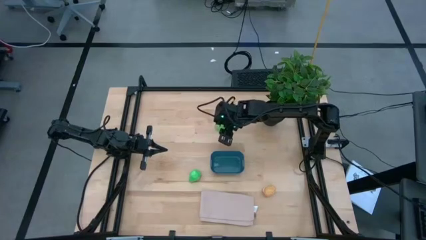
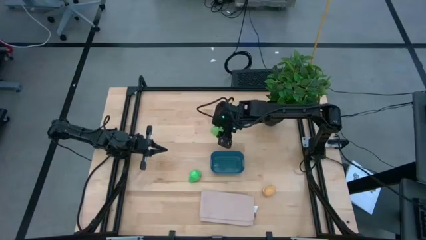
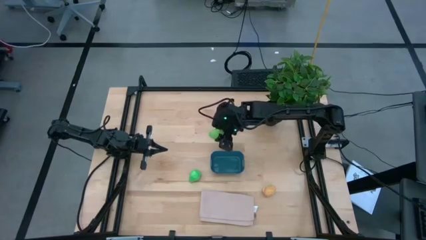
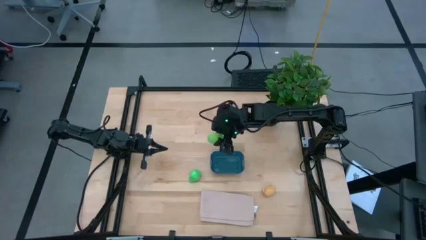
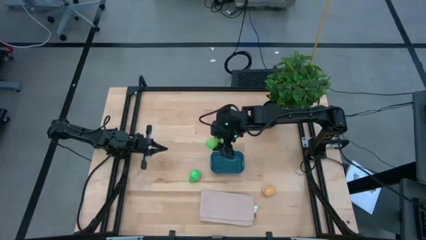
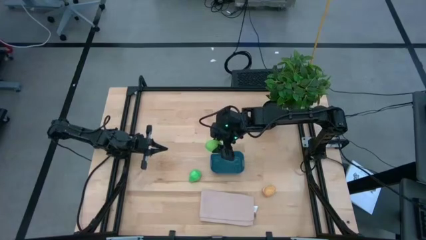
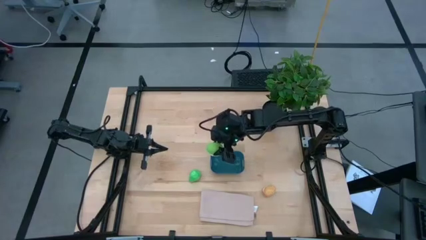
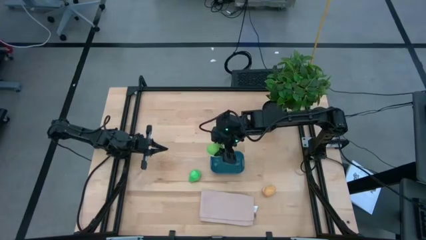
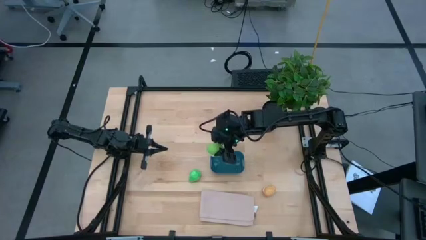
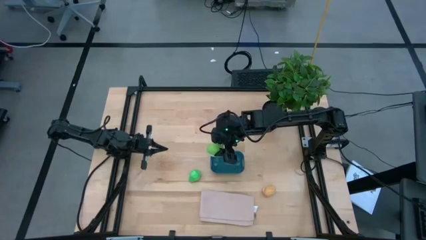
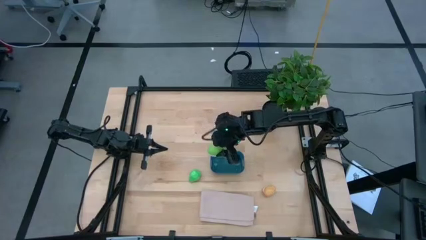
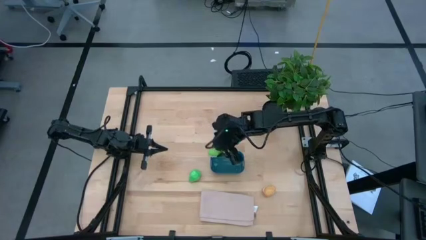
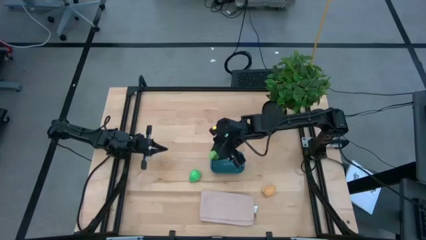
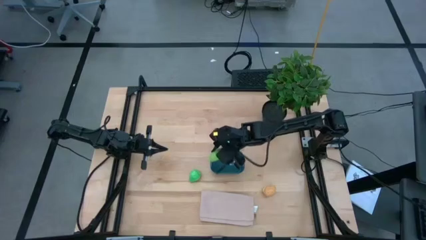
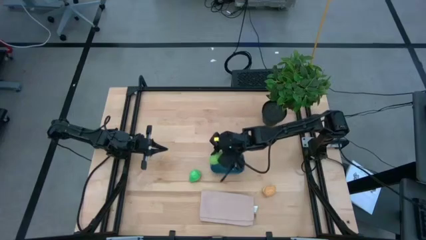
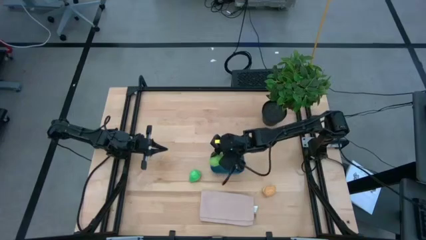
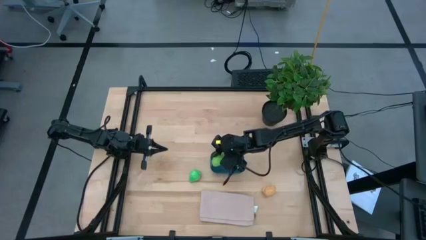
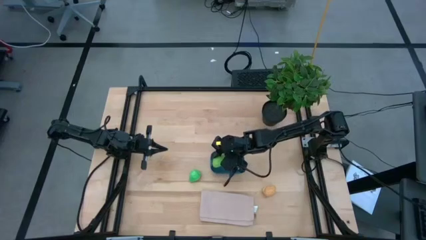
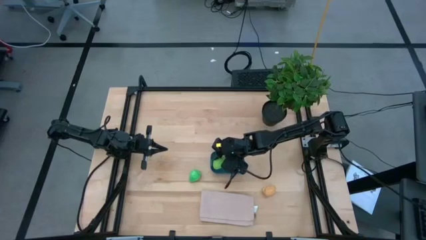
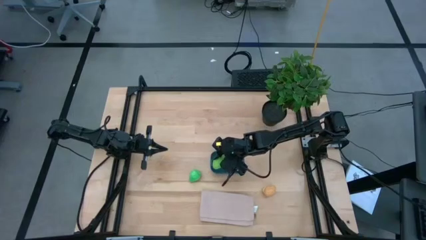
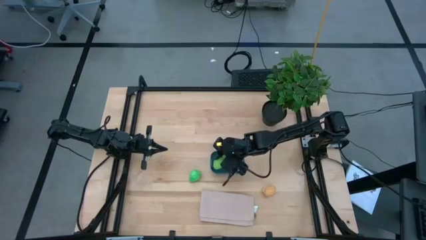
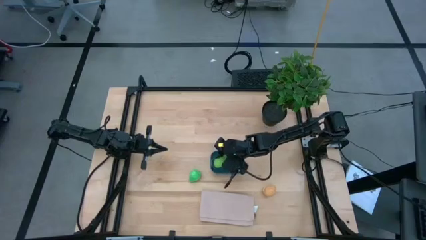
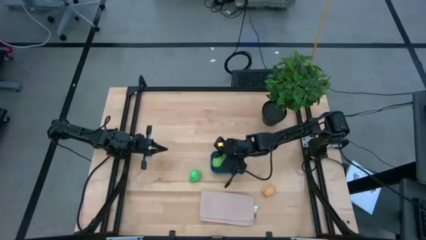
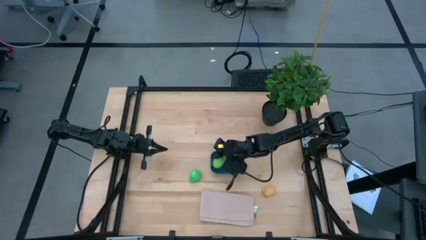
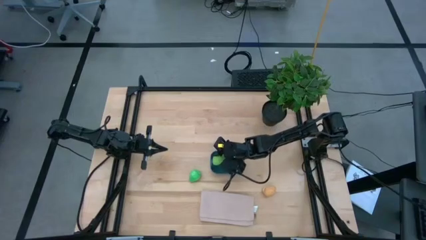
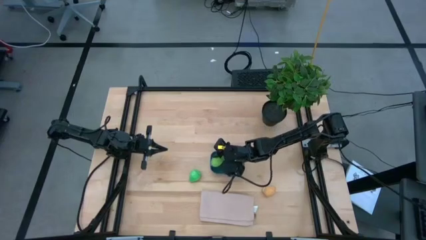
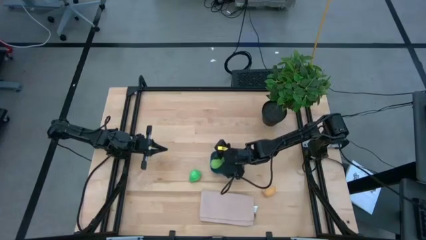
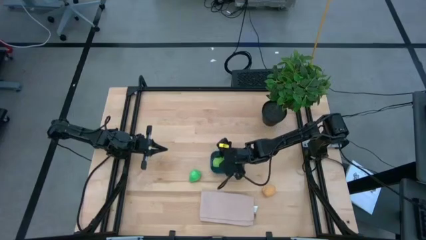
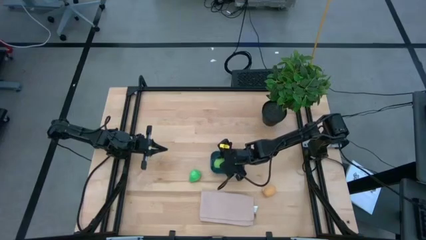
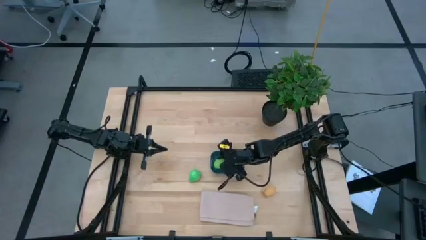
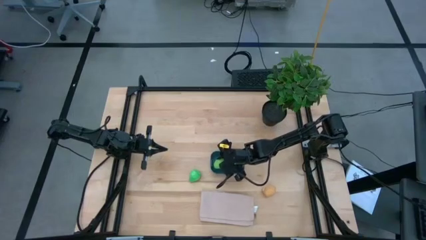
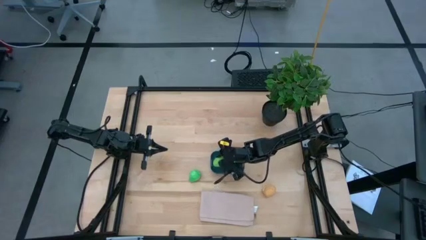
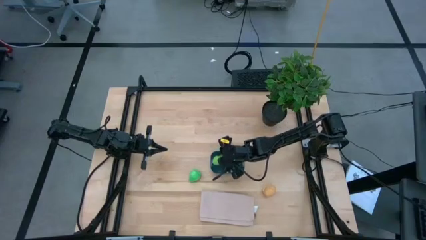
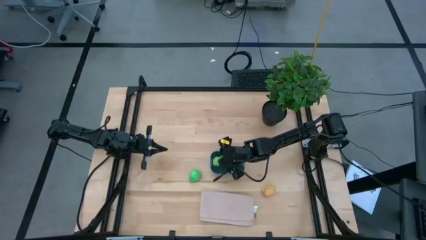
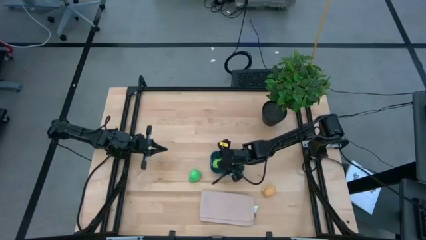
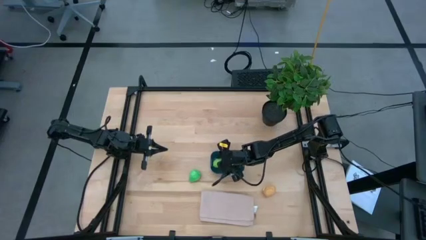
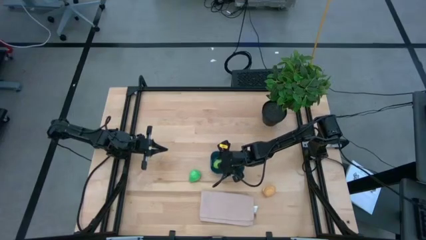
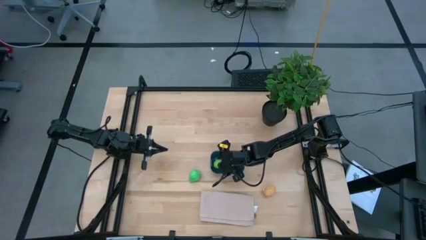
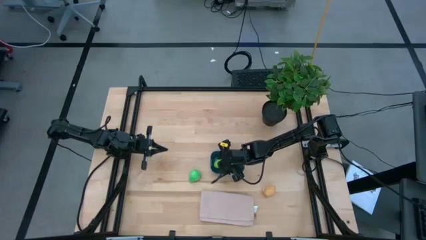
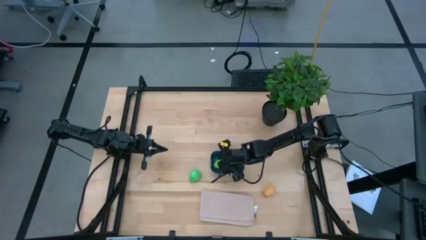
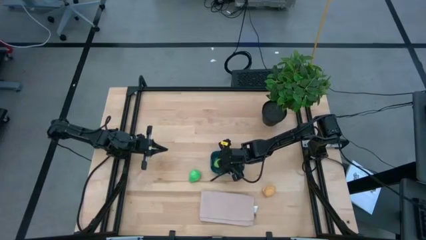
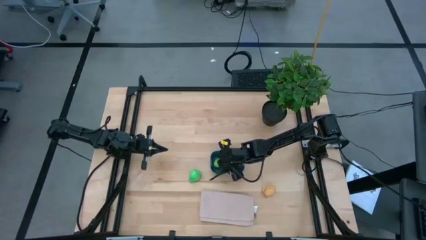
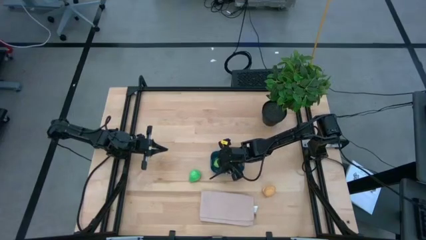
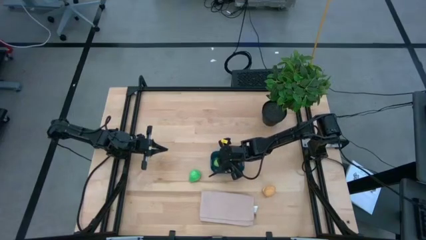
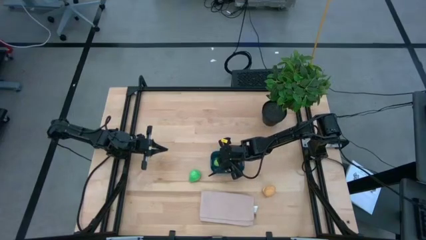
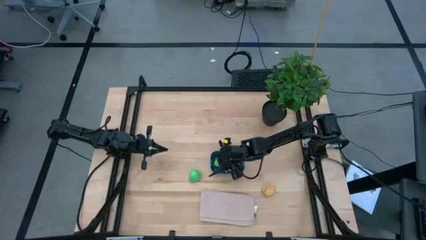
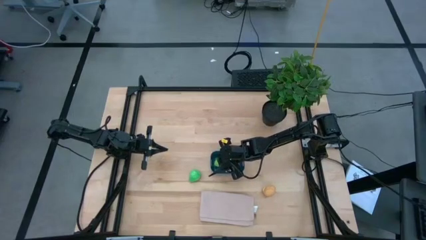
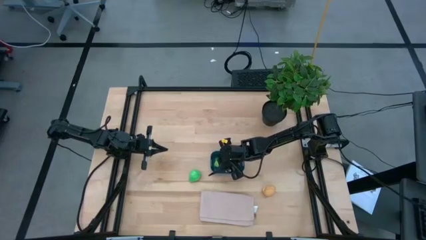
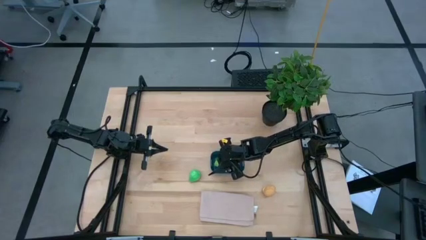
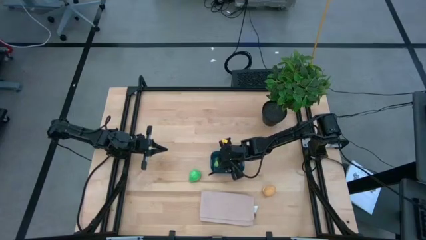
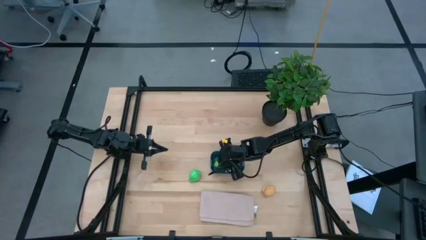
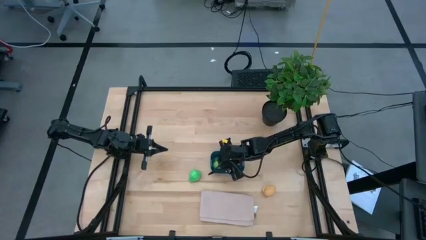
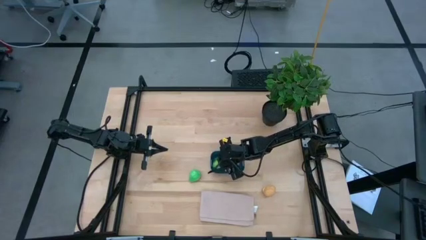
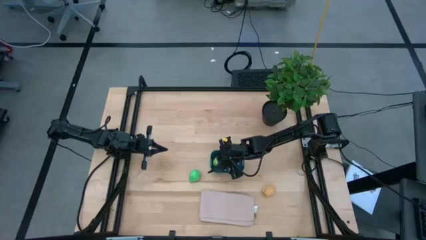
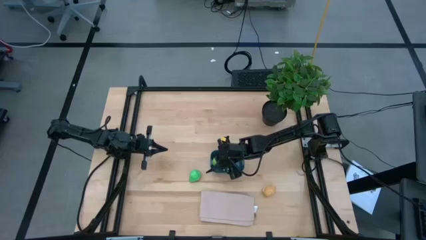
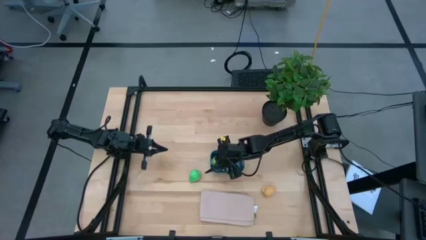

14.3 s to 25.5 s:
Task: Pick and placing Produce into tupperware
Put the green cabbage into the blue bin

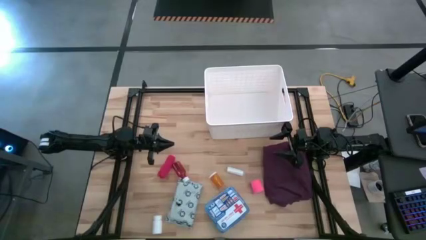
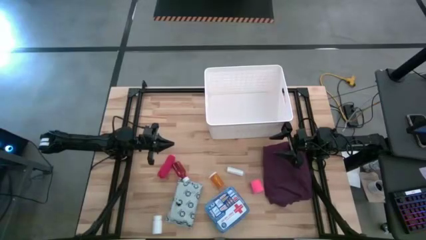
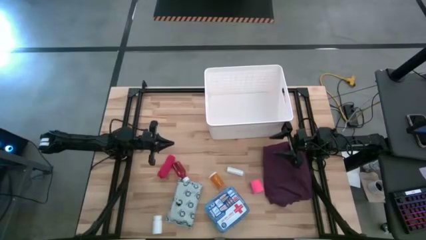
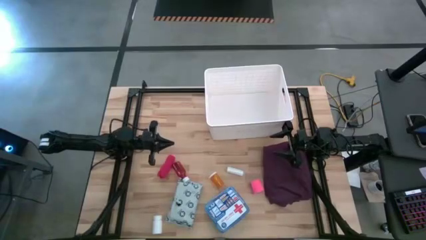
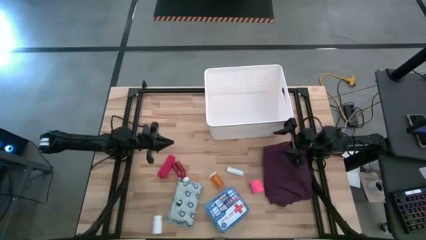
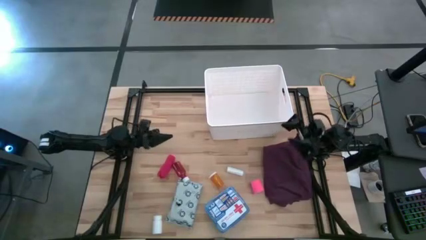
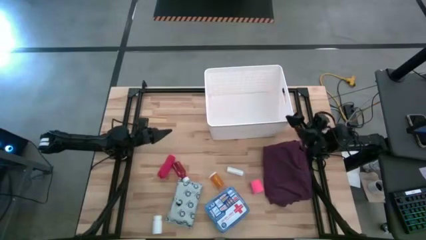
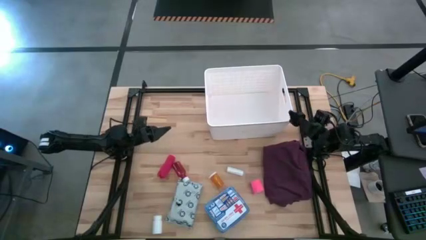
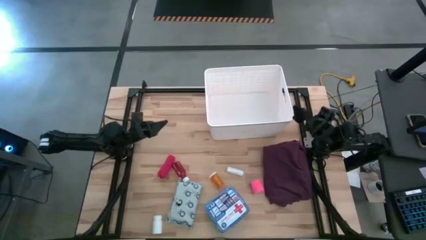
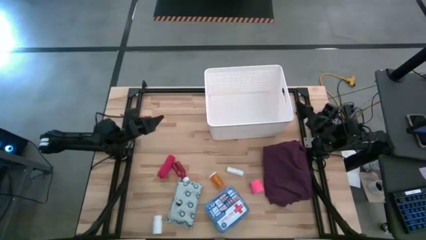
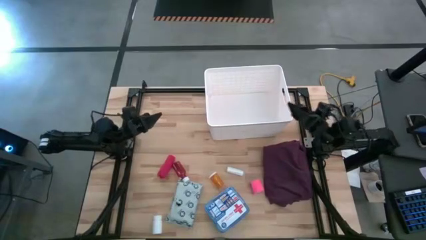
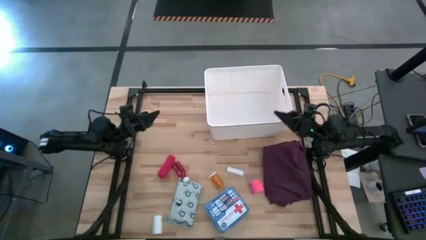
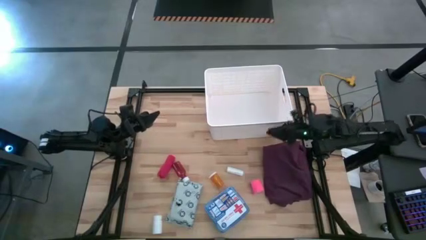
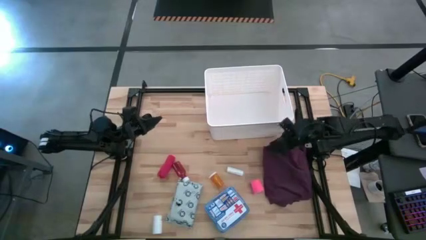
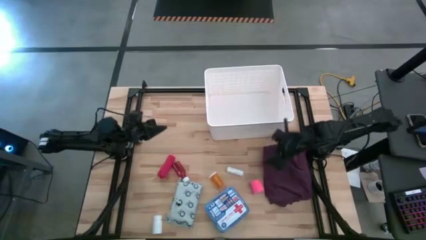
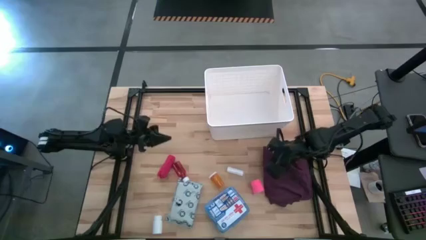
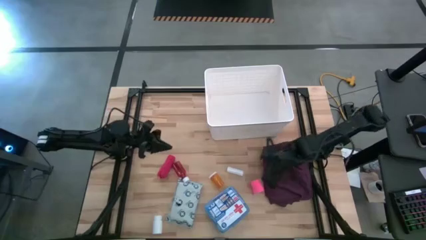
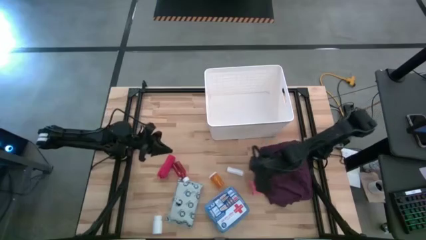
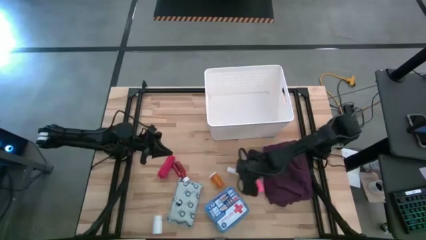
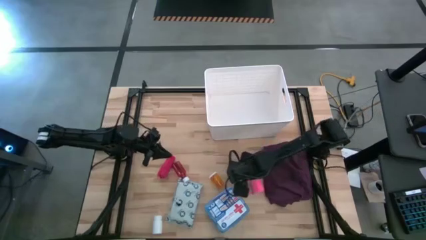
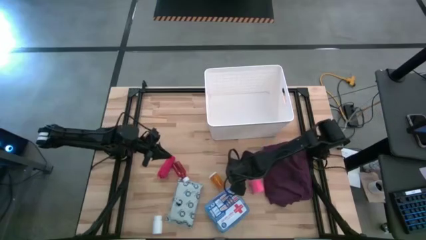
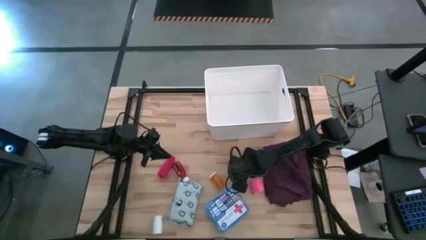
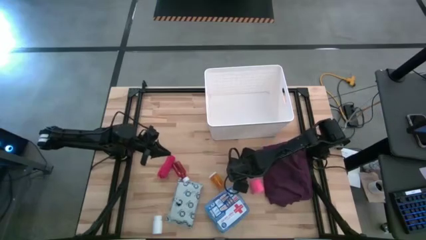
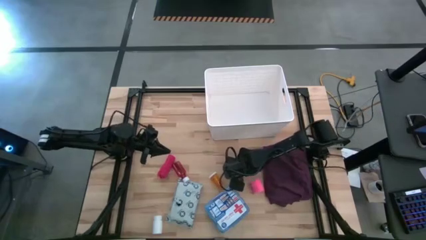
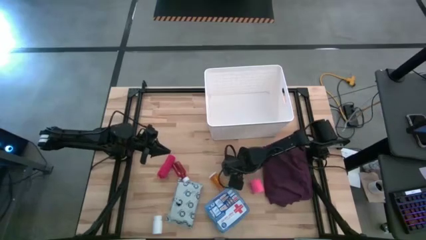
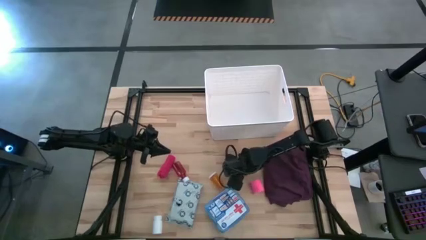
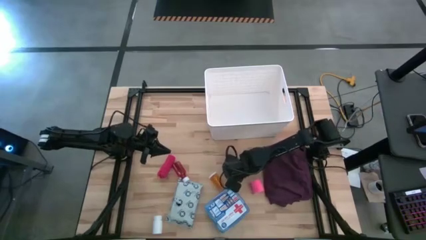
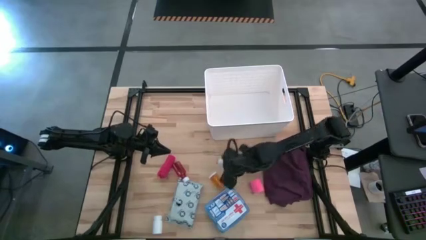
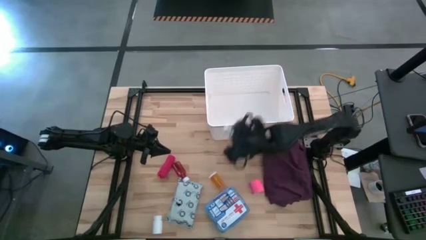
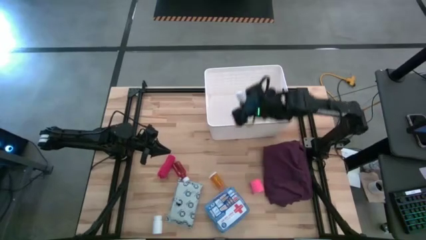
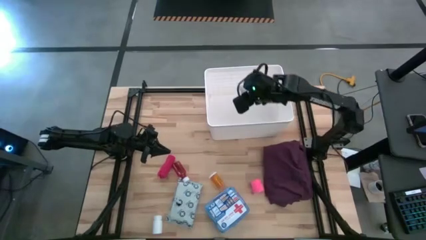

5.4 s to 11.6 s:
Task: Pick & place medical supplies in basket/bin
Put the rolled gauze into the white bin
